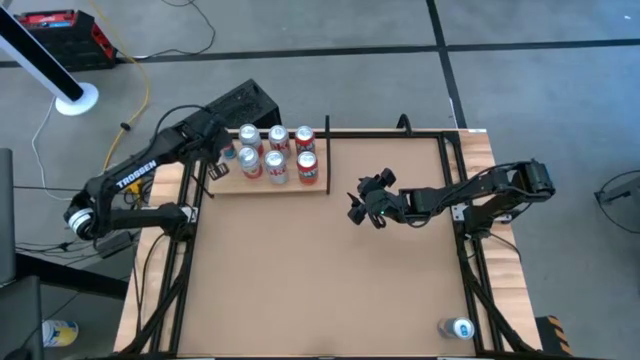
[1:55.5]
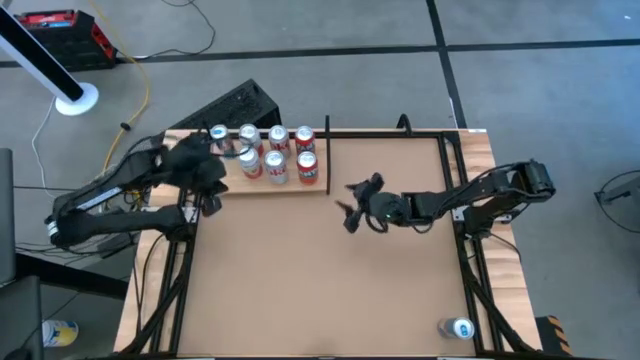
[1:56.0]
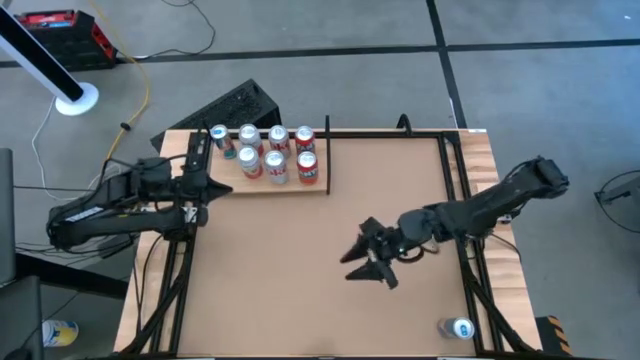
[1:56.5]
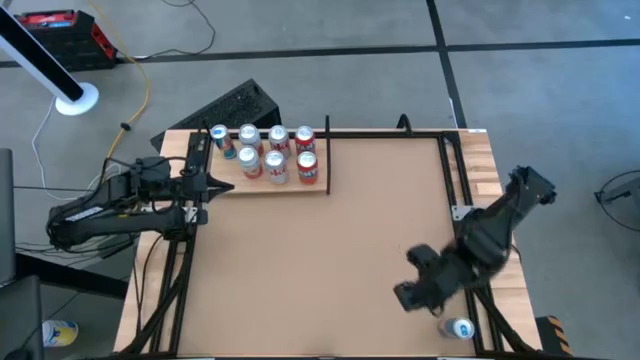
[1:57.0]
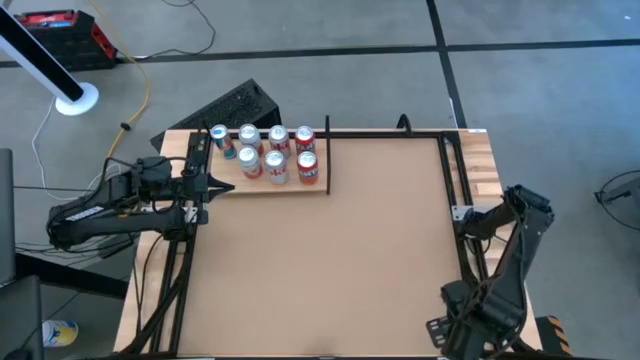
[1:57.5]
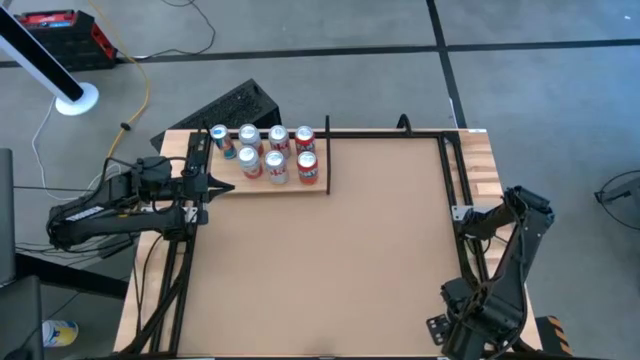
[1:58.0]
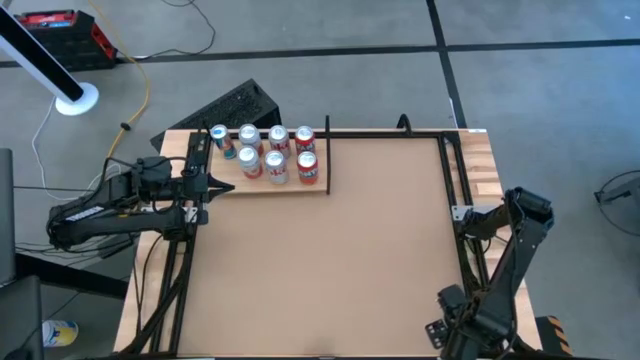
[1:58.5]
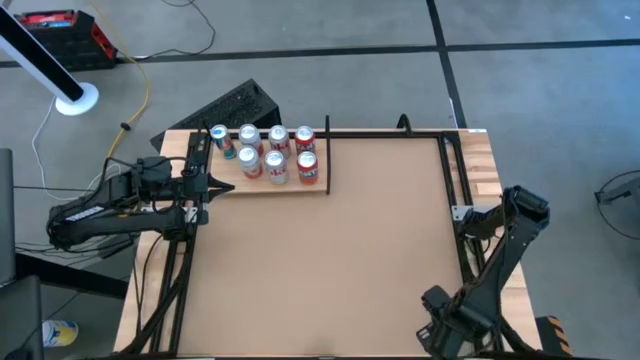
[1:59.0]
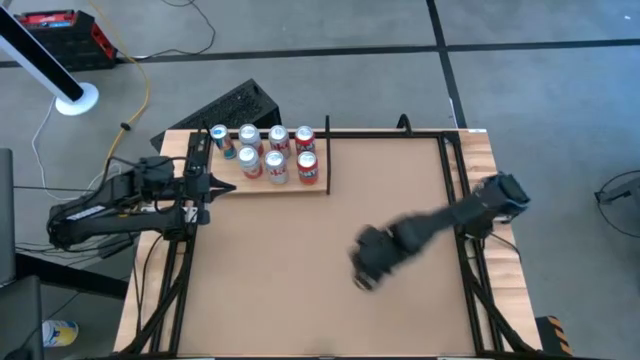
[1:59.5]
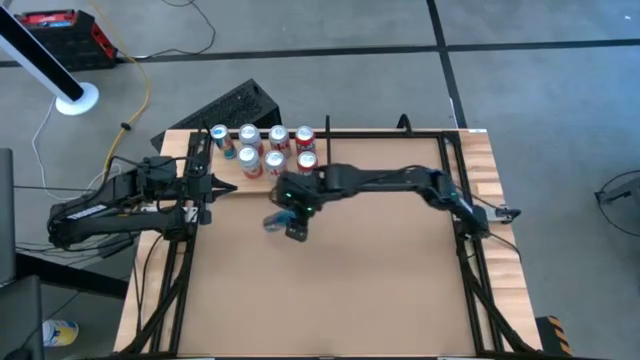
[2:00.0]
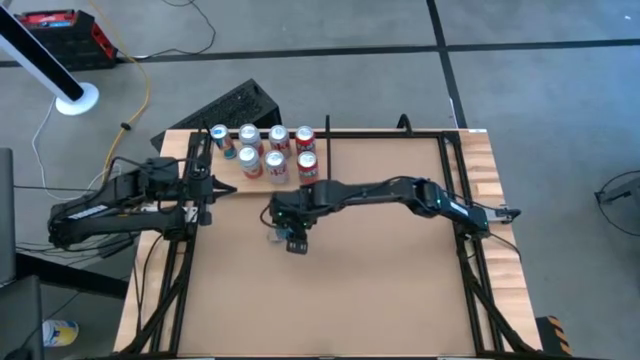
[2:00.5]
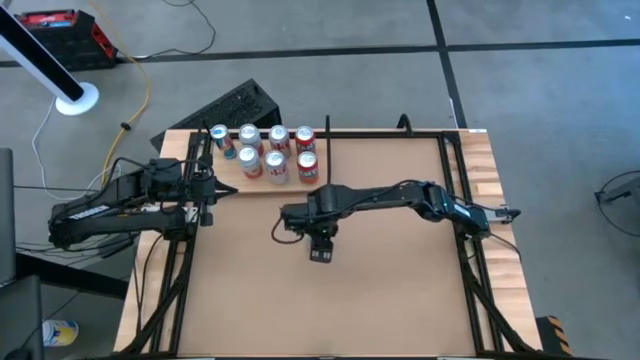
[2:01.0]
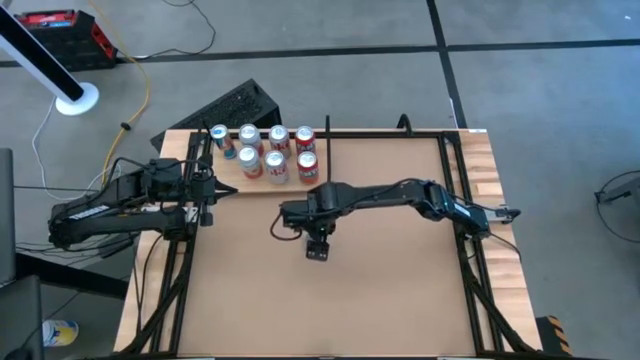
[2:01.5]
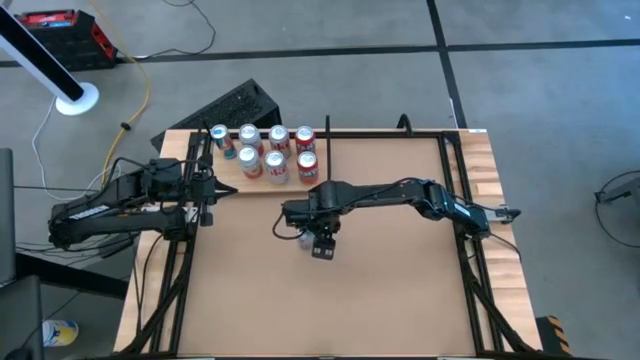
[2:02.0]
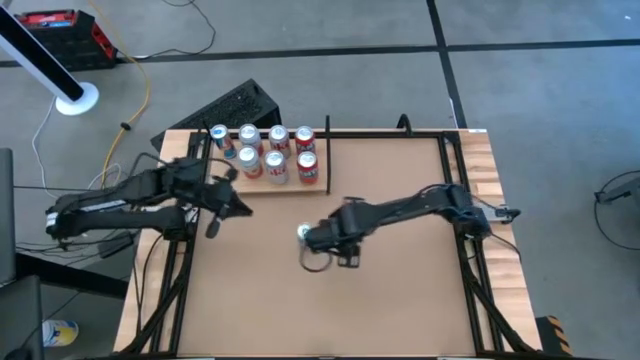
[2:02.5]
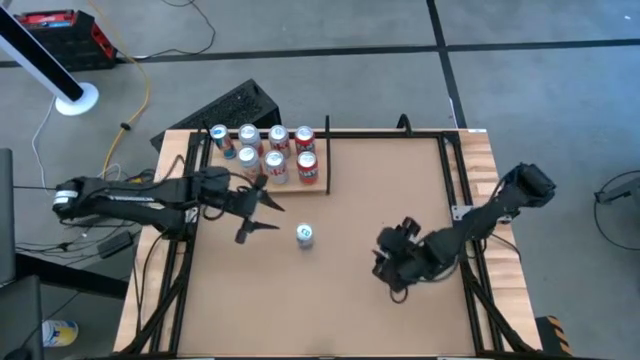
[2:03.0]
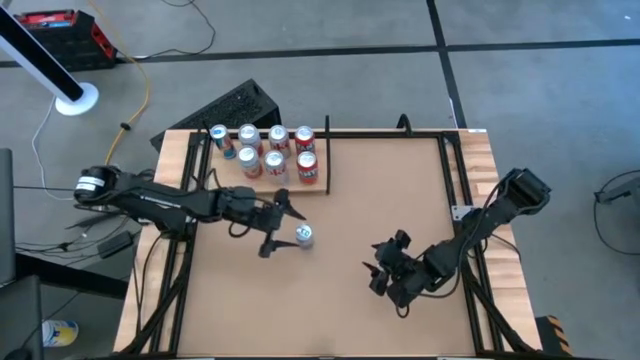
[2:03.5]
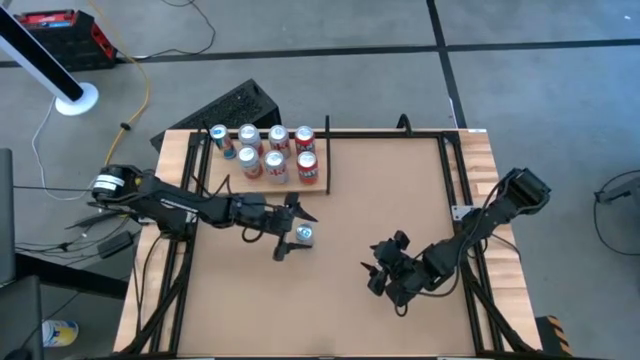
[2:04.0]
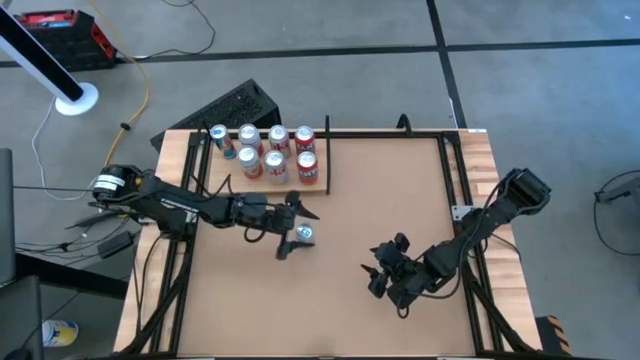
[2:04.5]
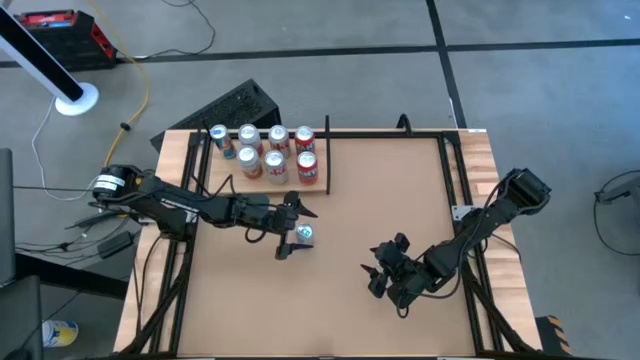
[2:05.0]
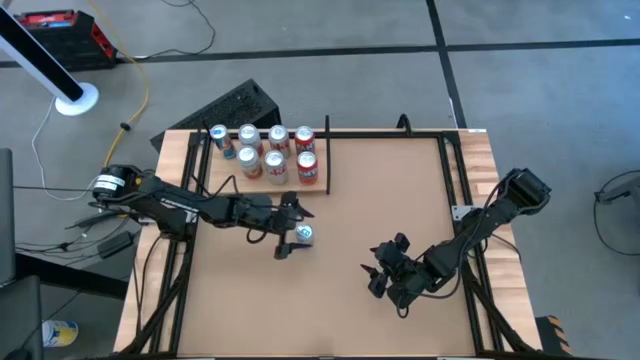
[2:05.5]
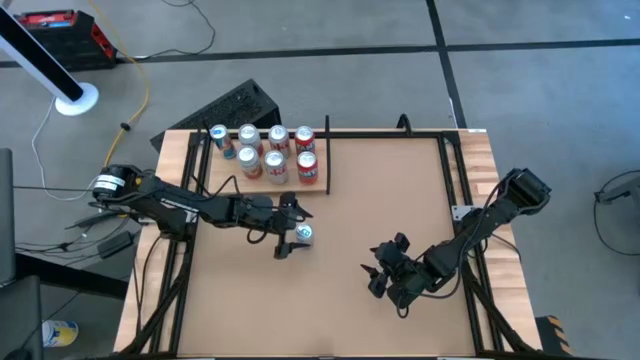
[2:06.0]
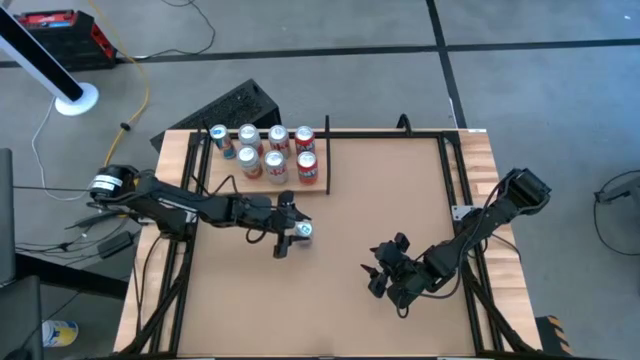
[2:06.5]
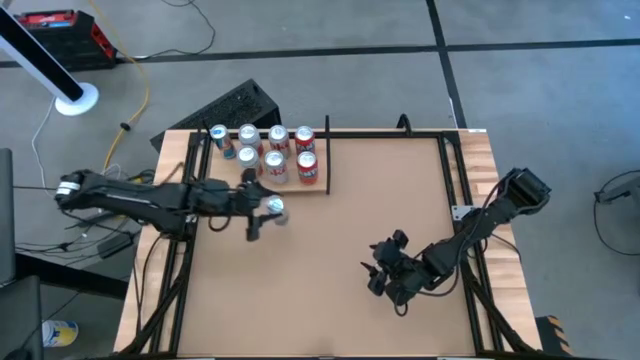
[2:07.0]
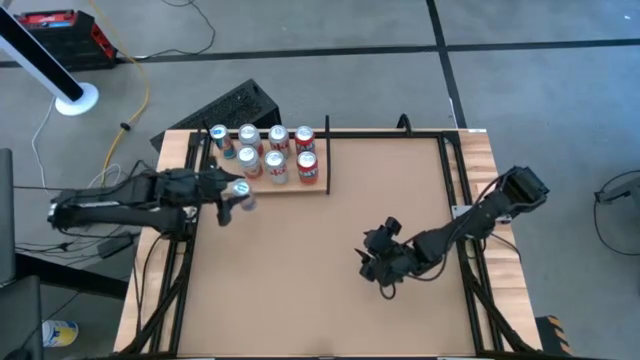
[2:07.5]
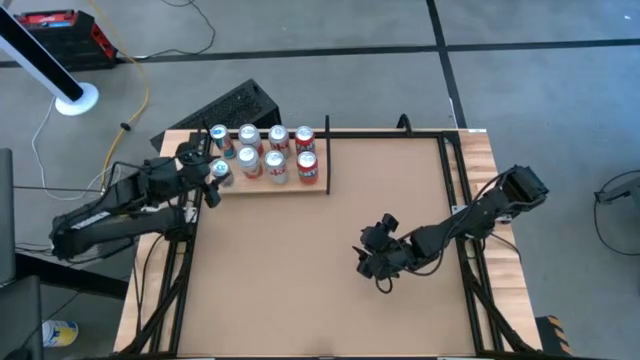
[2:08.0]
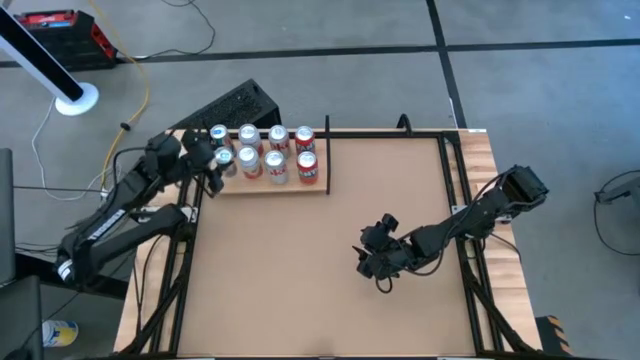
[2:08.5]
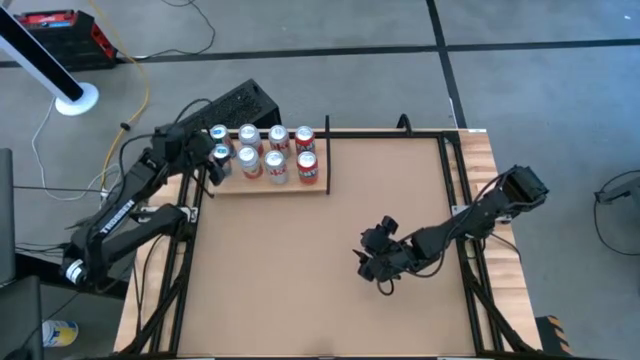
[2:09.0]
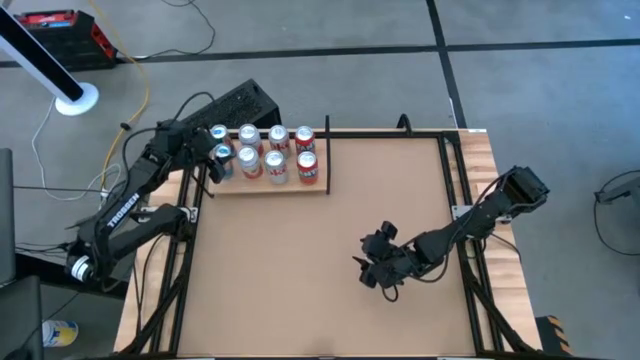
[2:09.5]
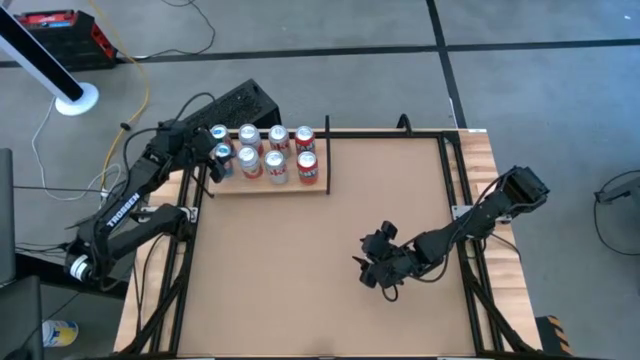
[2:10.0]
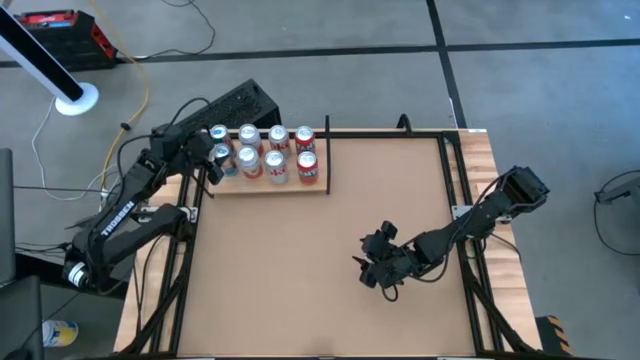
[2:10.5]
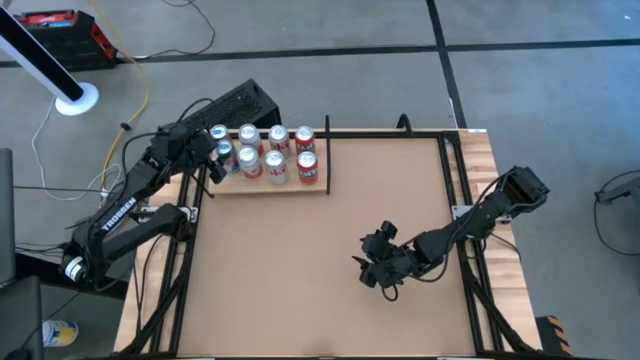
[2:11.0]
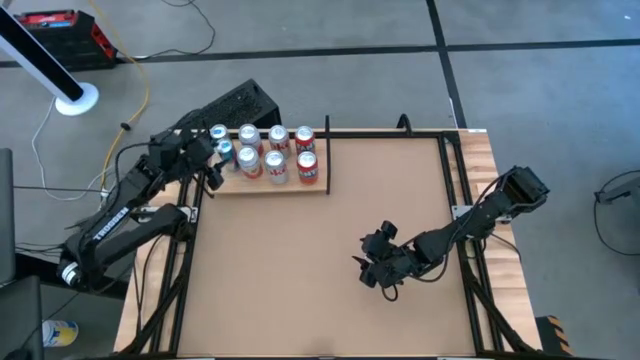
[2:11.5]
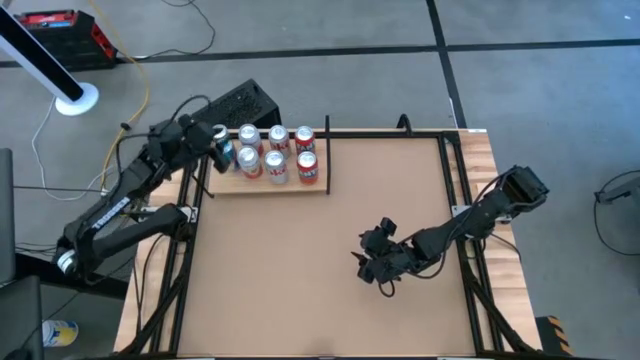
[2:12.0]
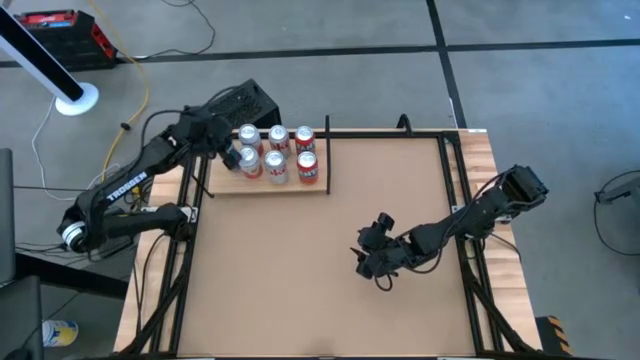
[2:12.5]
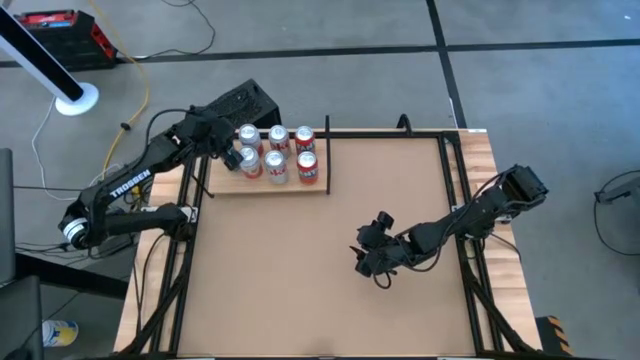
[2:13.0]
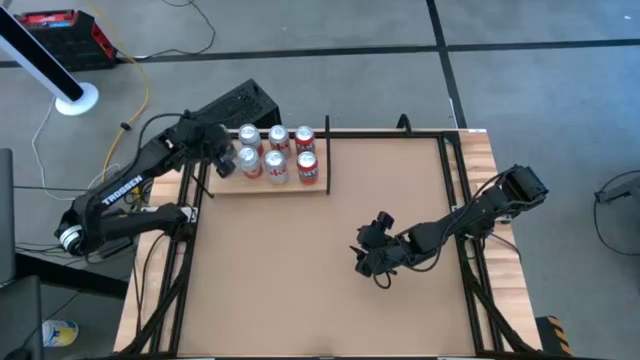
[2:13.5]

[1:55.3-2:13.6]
Task: Place canned beverage on shelf
Put the blue soda can on the shelf aligned with other blue soda can

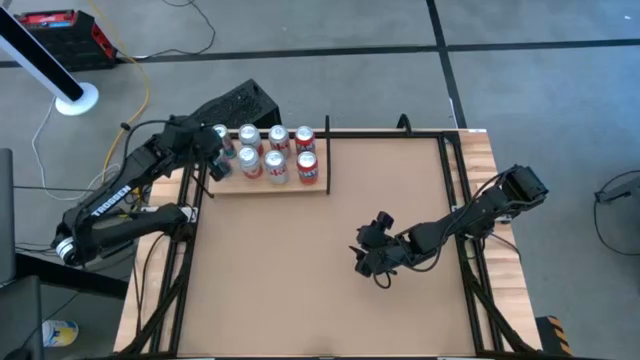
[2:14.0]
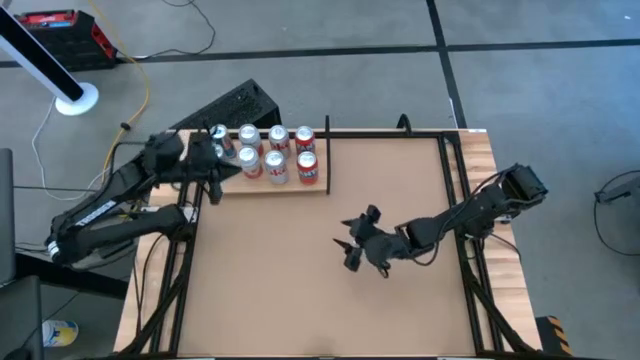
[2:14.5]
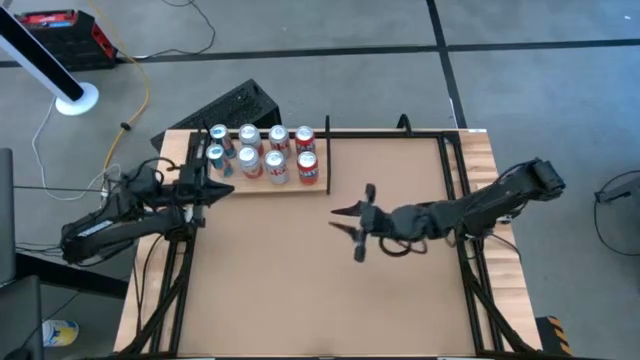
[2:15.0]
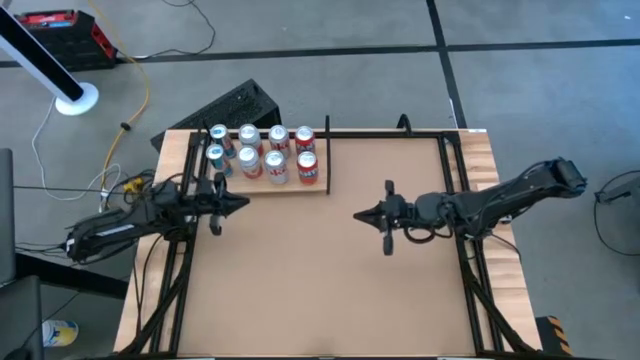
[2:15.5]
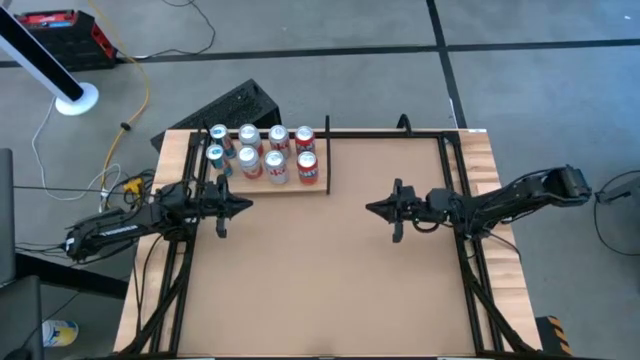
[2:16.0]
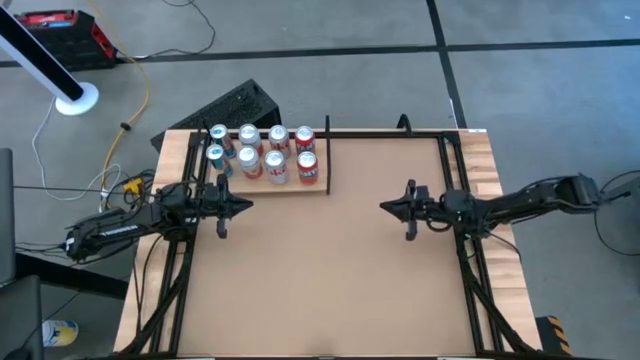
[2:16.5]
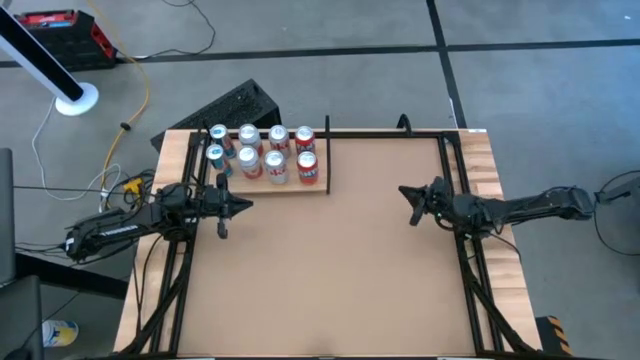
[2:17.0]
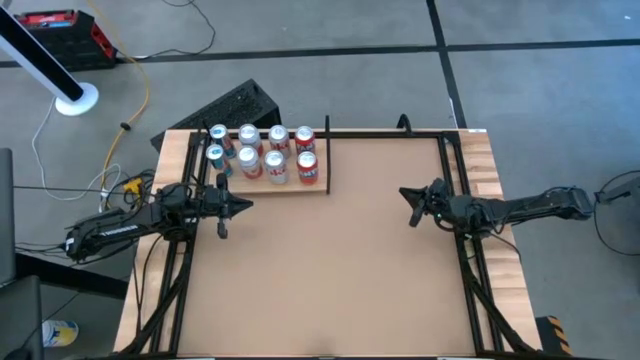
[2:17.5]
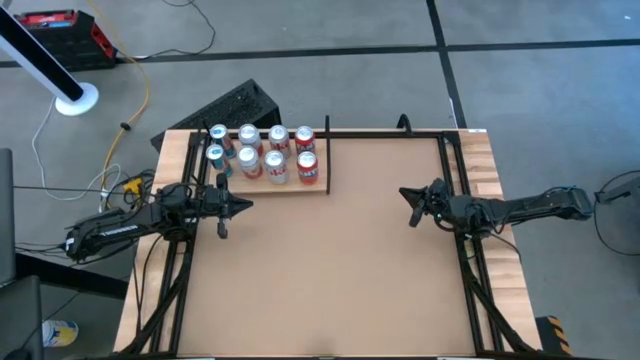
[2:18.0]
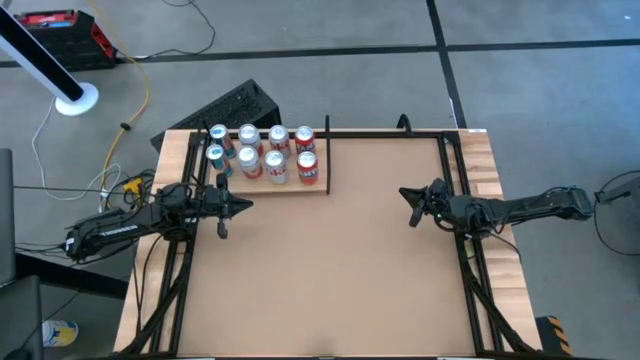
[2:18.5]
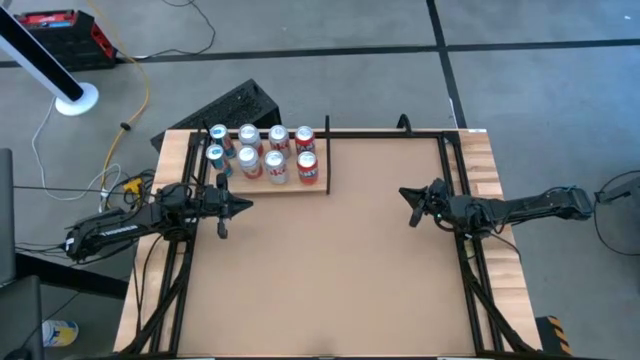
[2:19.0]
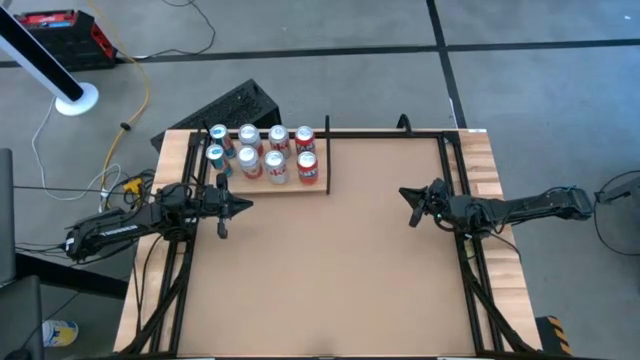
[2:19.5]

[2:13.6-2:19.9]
Return to Home Position
